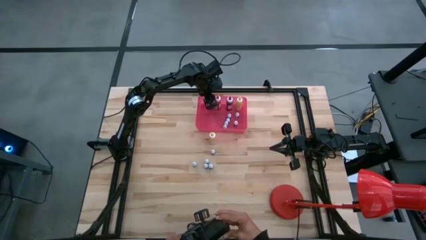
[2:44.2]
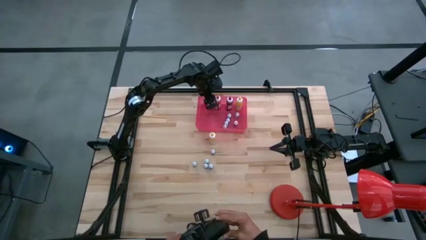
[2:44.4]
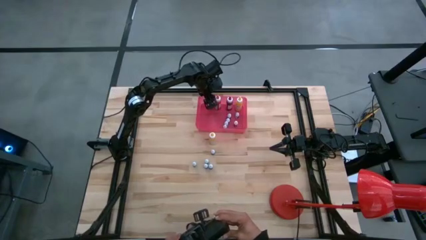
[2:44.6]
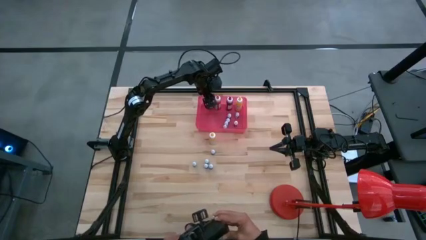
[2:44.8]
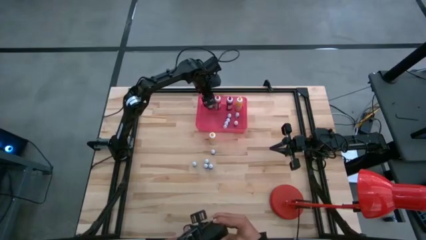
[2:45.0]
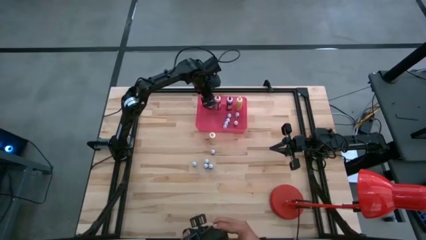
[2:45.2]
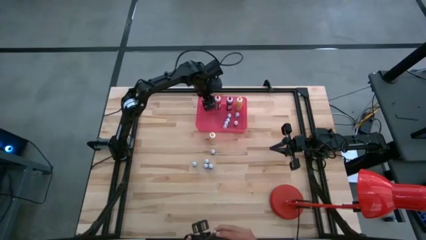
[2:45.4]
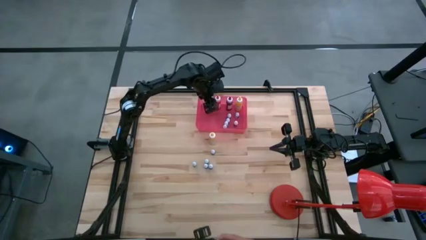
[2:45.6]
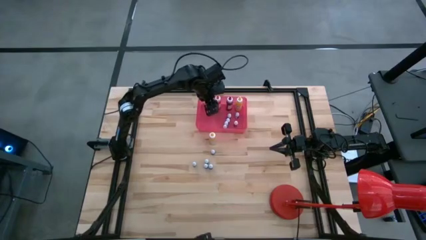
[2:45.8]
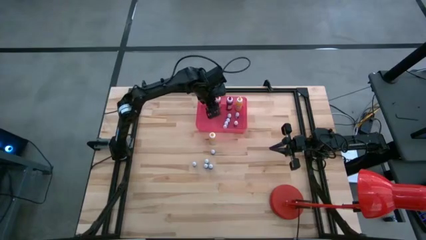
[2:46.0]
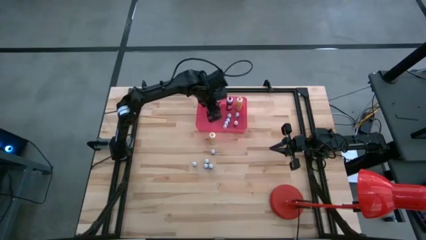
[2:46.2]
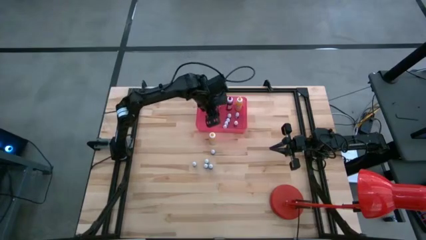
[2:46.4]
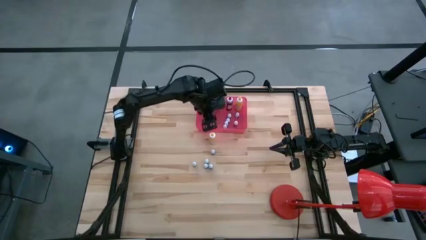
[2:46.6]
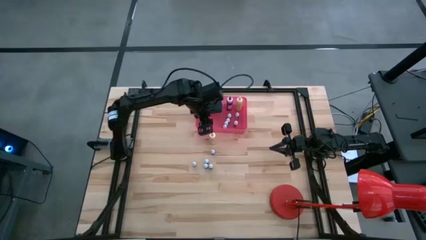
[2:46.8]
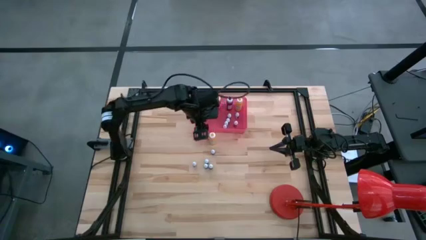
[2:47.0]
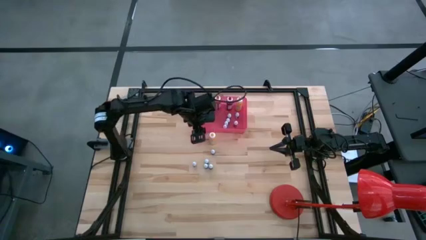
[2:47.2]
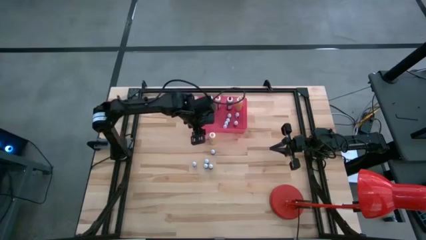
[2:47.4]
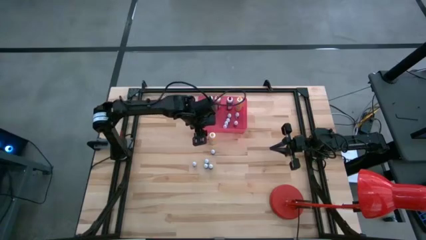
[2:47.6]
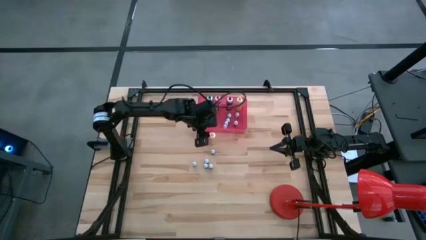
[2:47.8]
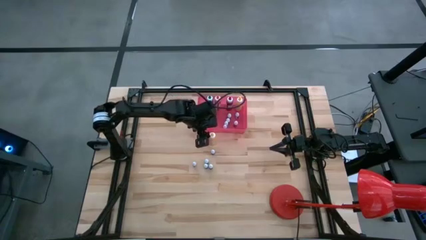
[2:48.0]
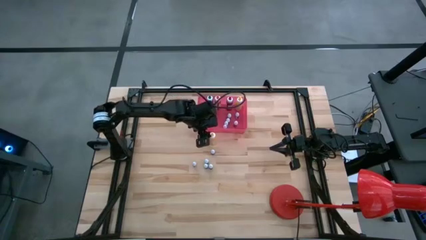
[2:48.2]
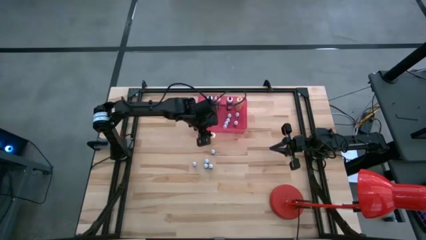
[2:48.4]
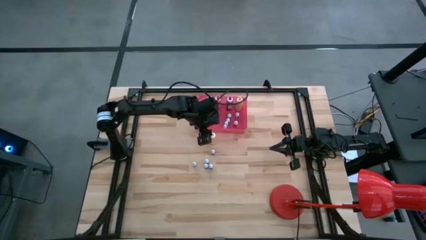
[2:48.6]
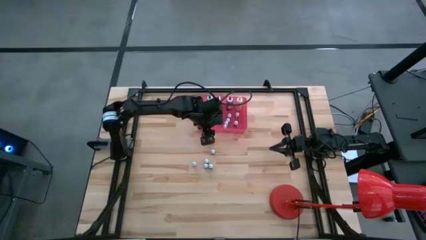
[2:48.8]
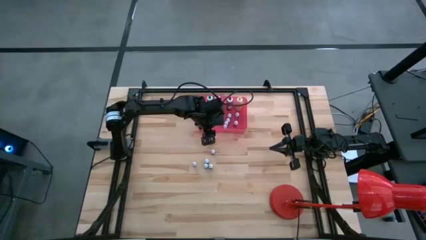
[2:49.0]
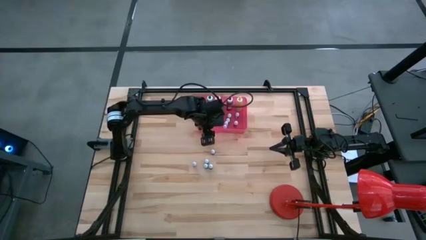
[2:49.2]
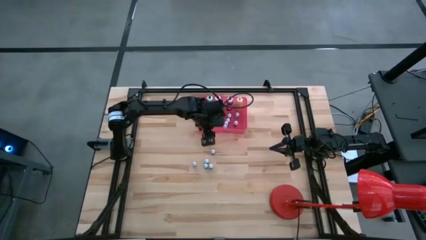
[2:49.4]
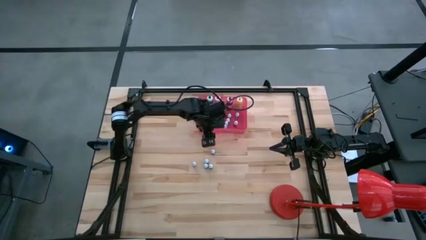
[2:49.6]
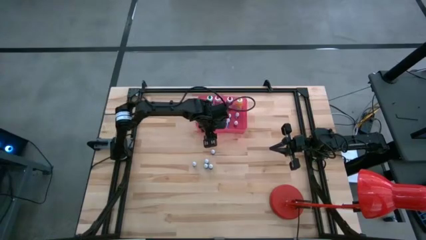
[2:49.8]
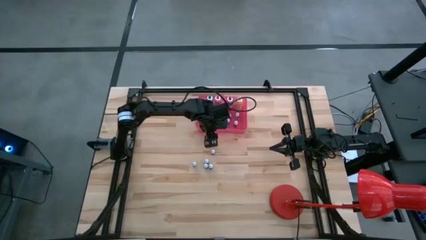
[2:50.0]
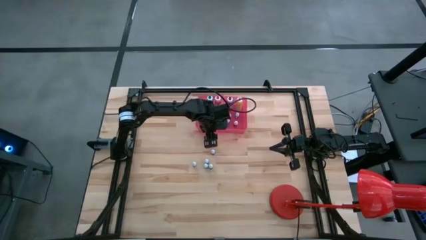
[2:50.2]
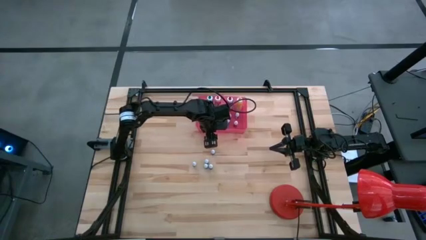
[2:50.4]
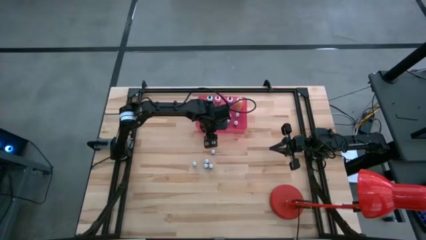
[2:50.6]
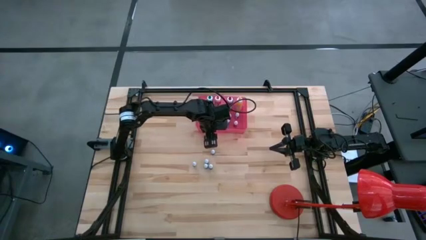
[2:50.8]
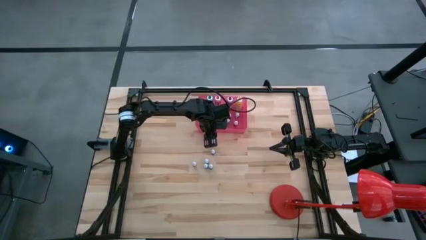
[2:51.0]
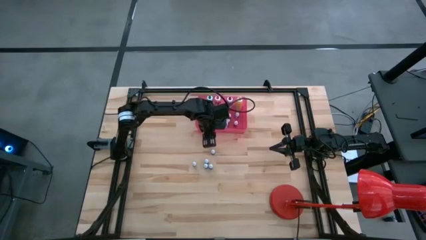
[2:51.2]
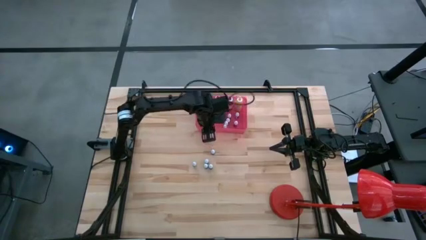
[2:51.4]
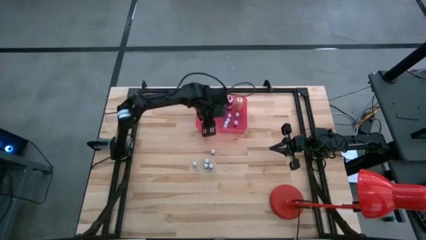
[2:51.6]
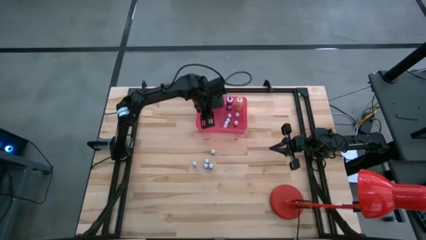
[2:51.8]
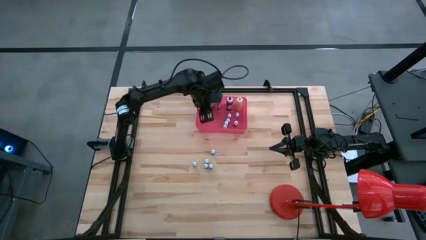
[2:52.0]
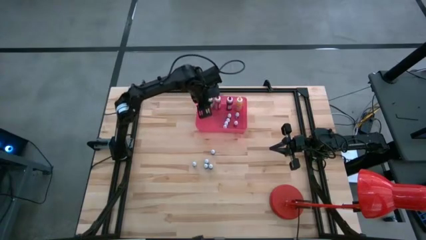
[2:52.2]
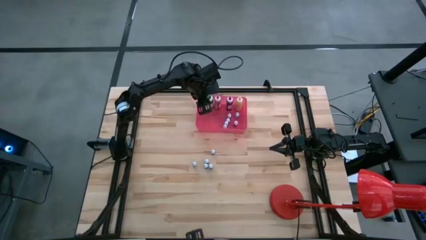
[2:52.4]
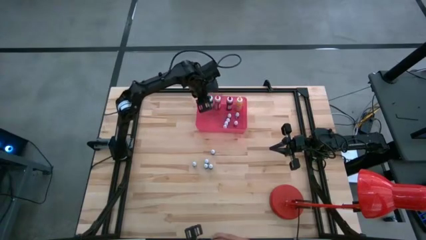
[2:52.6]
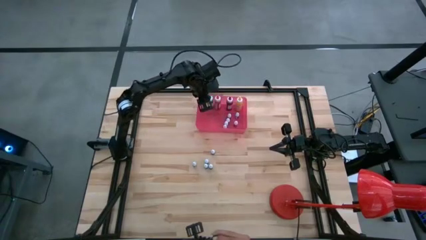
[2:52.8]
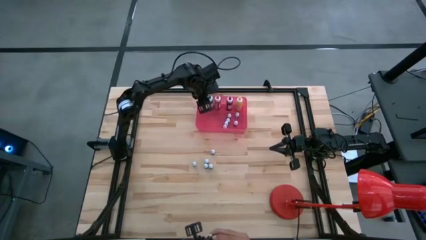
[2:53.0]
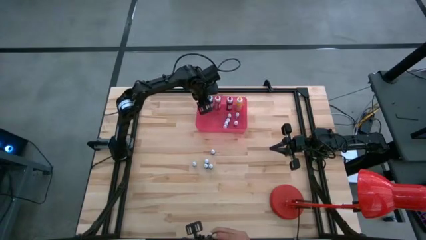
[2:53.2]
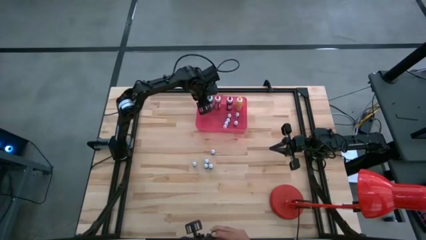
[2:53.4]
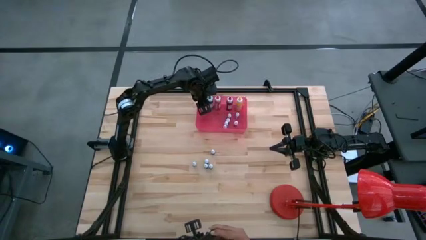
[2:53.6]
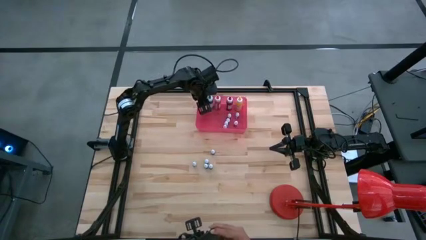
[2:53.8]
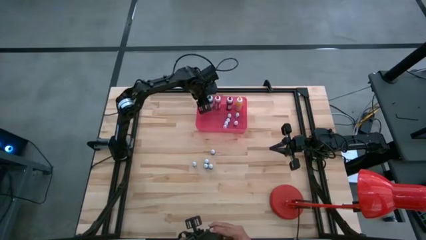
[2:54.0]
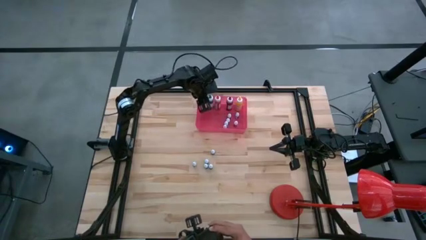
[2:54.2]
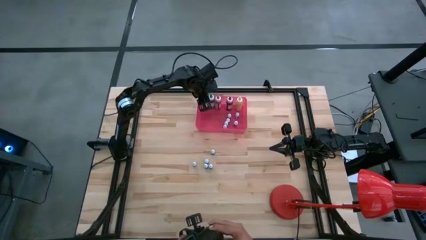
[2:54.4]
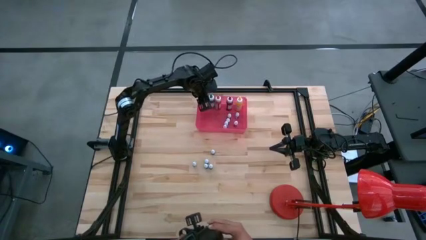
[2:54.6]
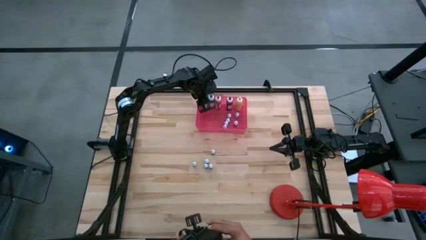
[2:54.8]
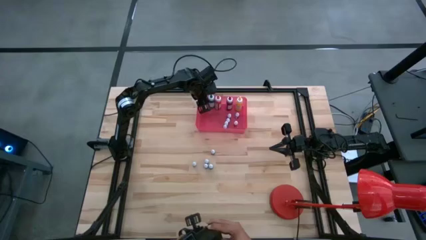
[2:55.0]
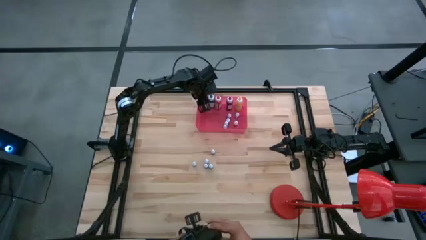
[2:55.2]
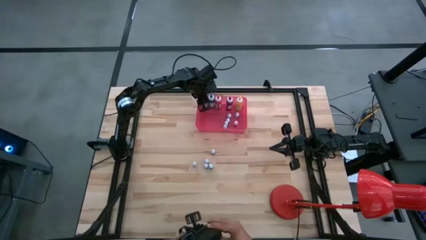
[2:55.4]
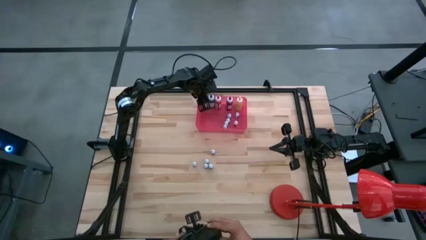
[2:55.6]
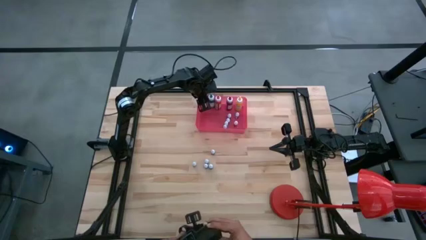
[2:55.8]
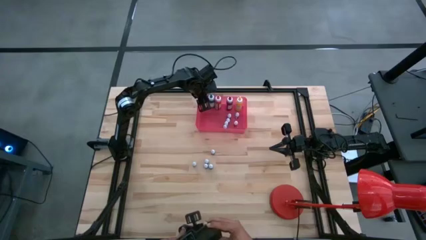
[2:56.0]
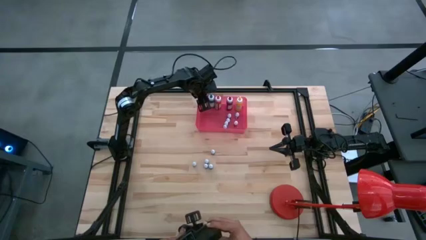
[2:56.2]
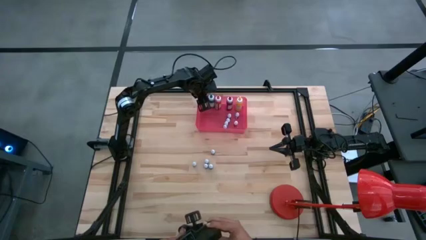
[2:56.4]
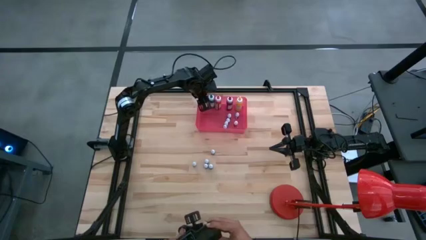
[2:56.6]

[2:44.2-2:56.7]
Task: Pick & Place food coloring
Put the large yellow food coloring bottle into the pink bin

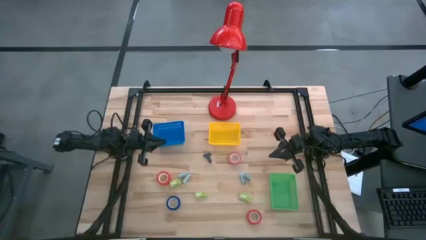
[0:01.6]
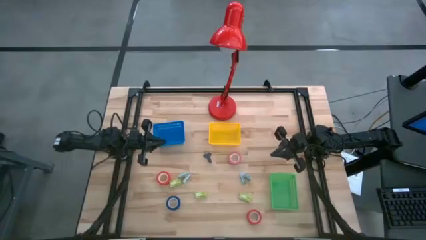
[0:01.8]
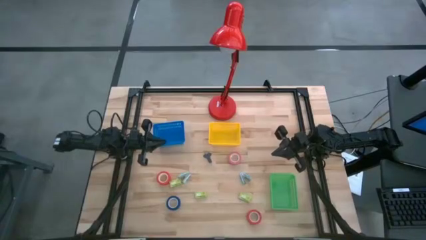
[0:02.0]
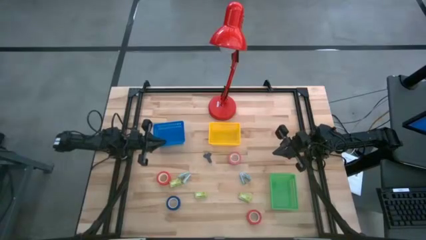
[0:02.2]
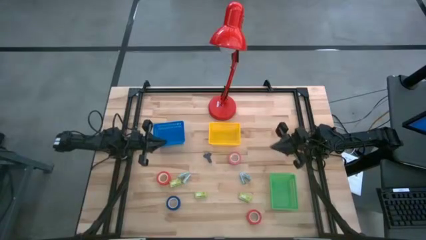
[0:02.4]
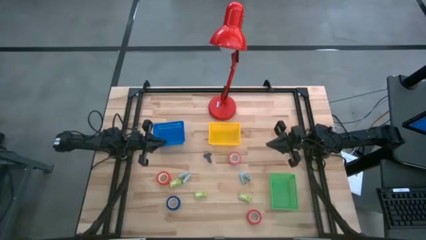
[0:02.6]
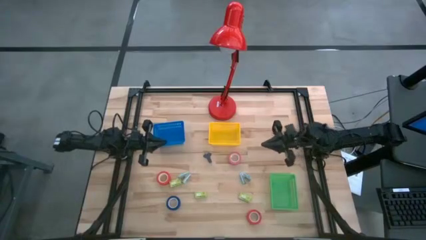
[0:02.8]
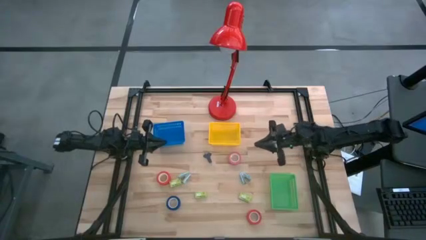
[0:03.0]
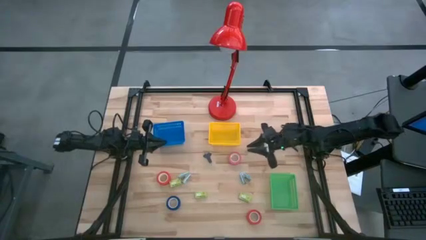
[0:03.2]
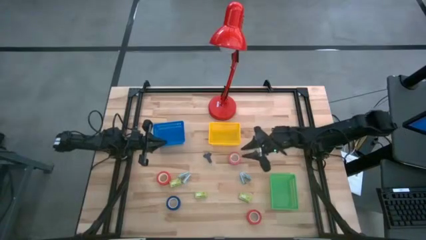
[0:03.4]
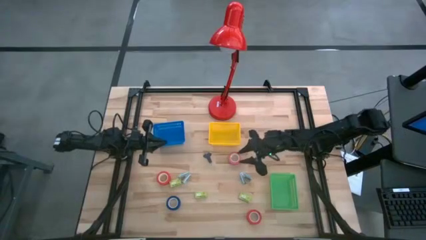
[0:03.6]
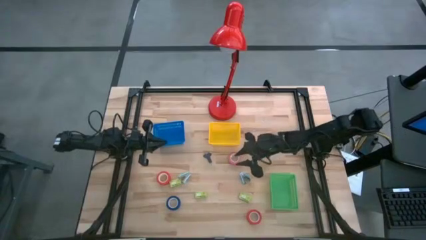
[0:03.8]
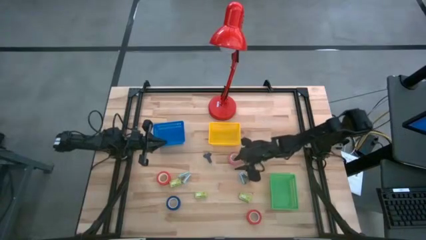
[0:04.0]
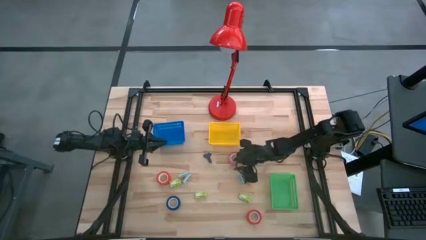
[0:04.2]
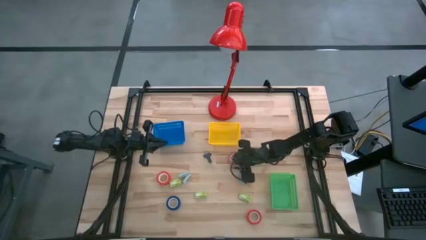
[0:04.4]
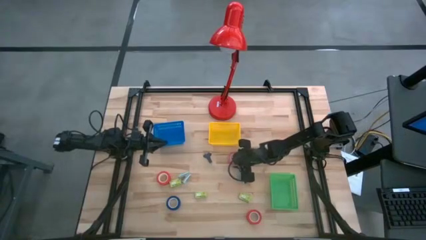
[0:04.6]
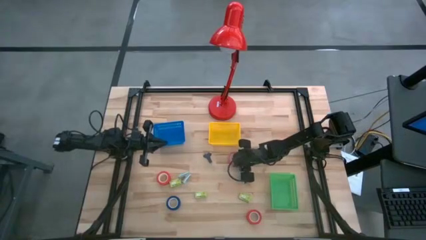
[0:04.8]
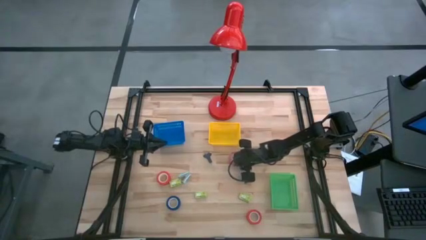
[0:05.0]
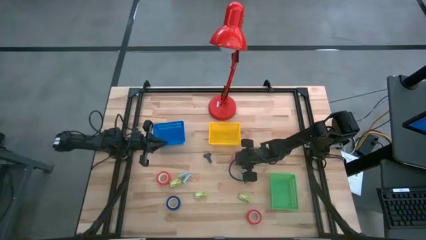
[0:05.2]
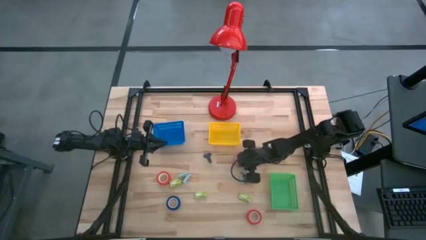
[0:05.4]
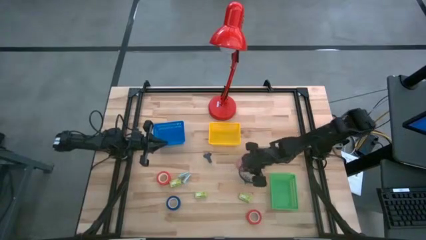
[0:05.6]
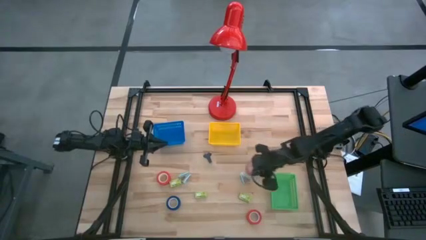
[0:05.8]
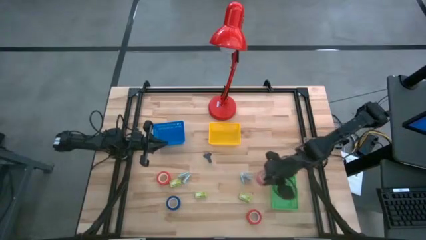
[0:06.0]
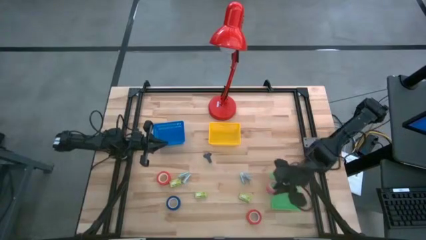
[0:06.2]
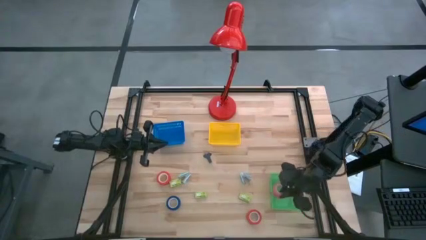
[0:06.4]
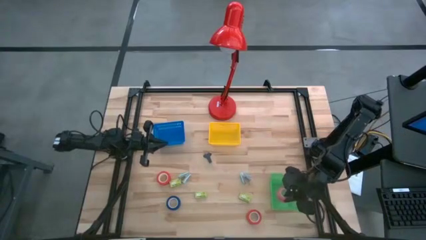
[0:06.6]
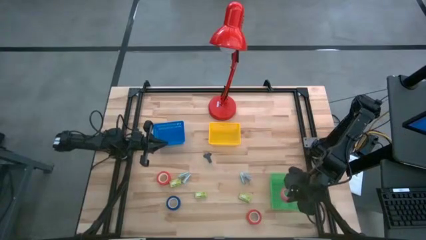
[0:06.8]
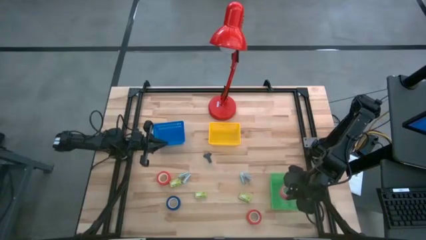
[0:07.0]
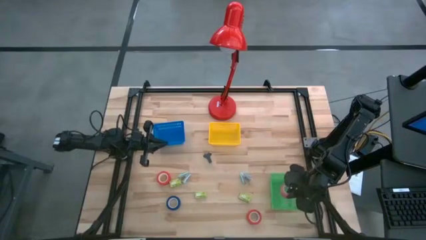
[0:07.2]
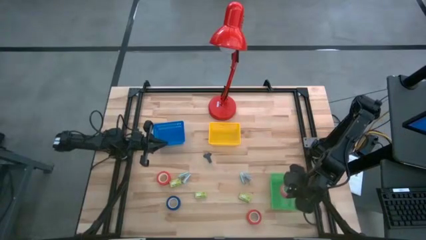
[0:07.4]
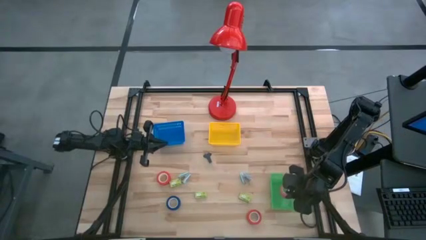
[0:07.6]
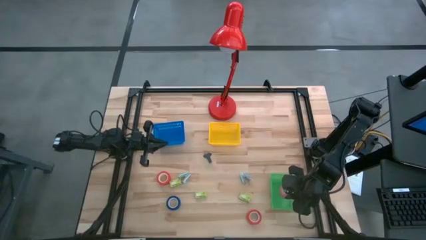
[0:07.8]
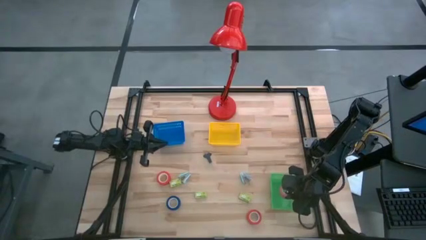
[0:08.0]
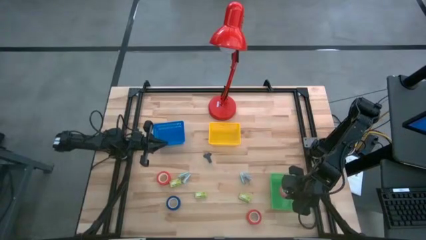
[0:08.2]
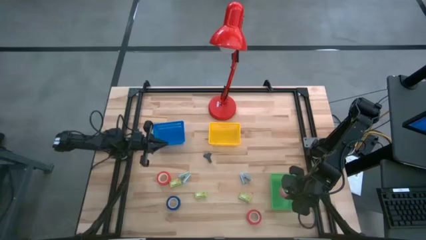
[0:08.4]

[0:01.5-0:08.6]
Task: Pick and place Stapler, Stapler remover, tape
Put the pink tape into the green bin
